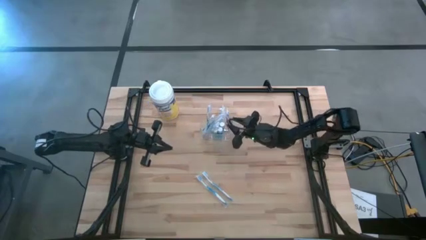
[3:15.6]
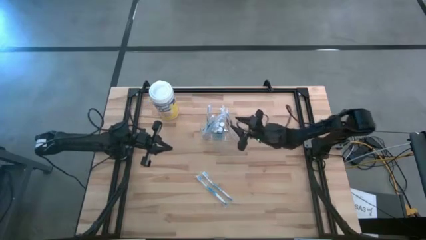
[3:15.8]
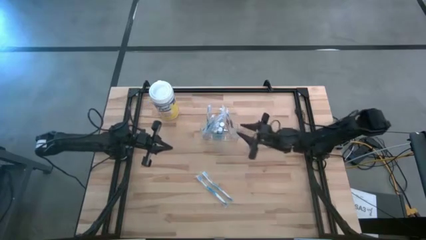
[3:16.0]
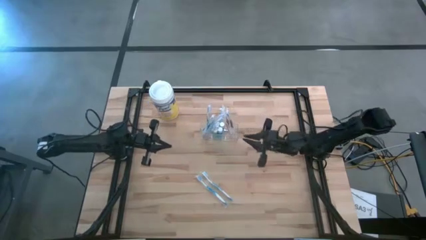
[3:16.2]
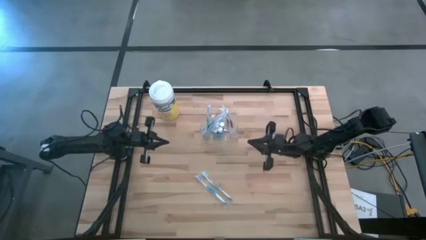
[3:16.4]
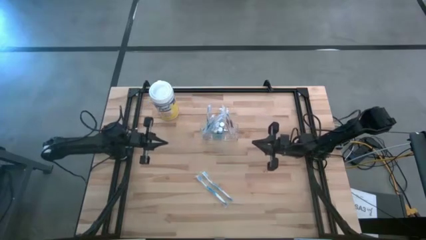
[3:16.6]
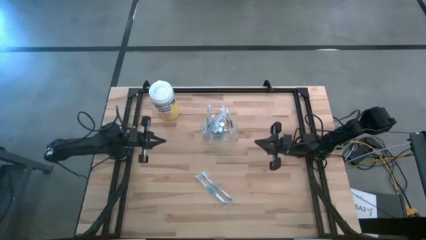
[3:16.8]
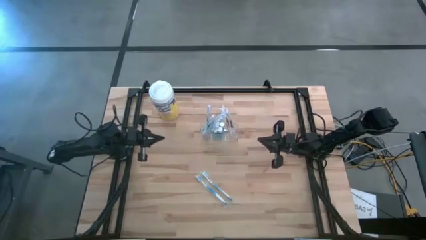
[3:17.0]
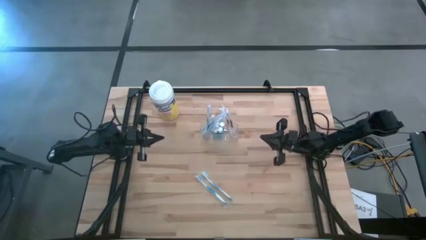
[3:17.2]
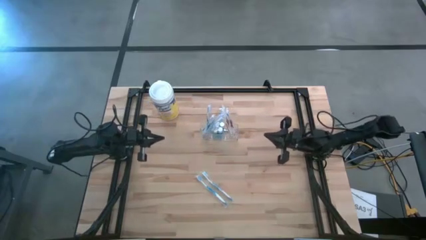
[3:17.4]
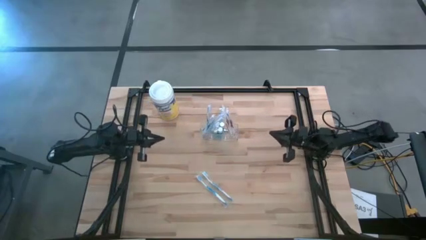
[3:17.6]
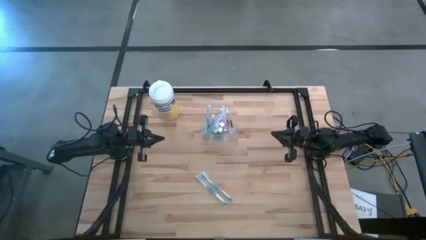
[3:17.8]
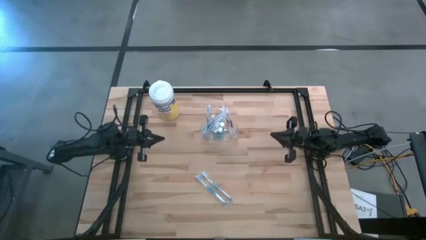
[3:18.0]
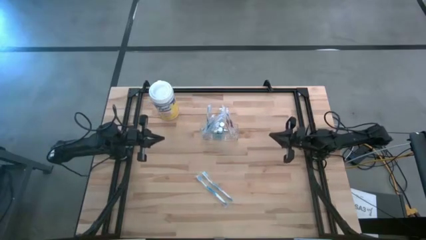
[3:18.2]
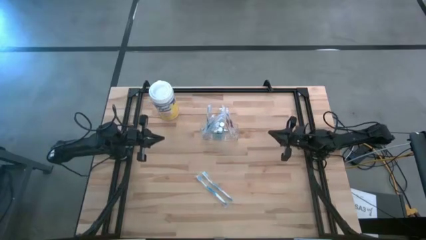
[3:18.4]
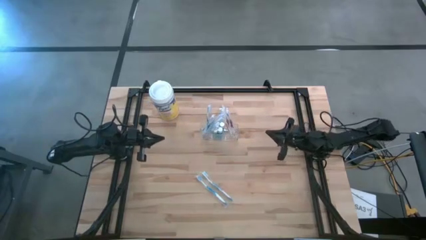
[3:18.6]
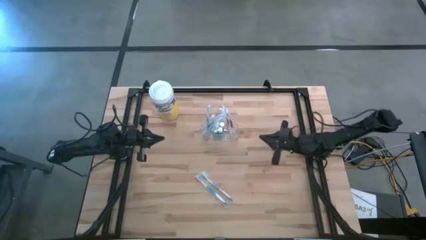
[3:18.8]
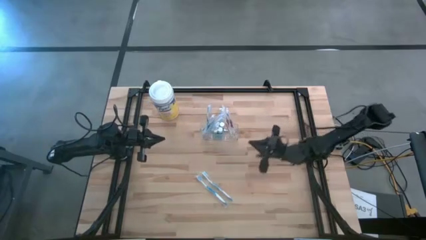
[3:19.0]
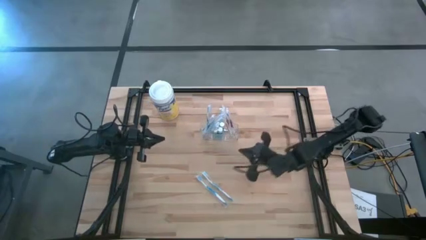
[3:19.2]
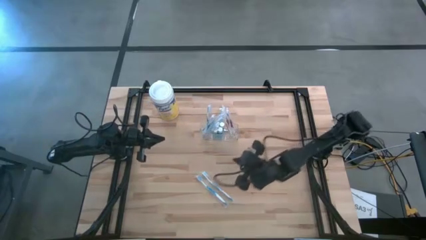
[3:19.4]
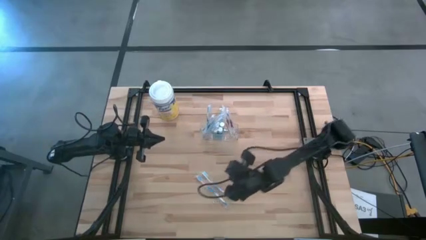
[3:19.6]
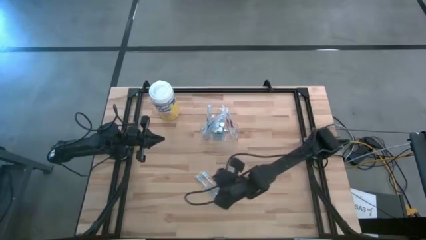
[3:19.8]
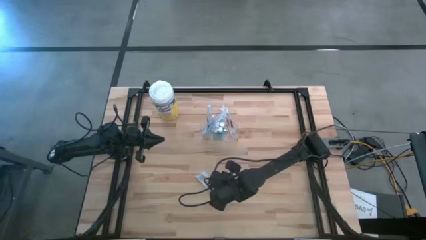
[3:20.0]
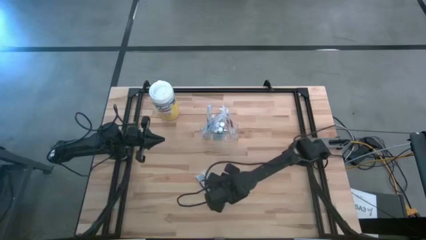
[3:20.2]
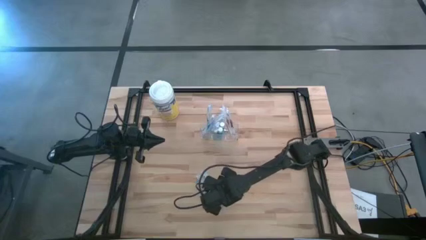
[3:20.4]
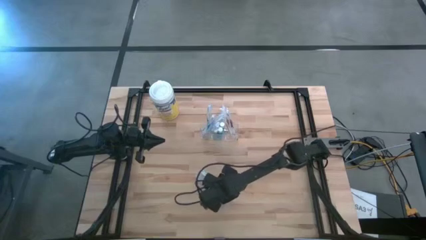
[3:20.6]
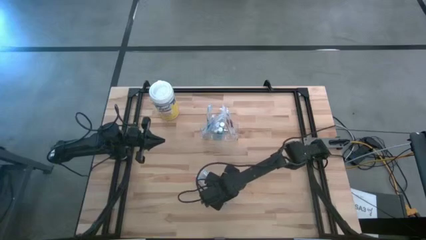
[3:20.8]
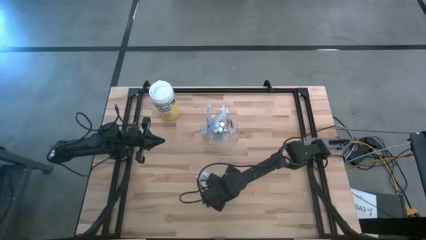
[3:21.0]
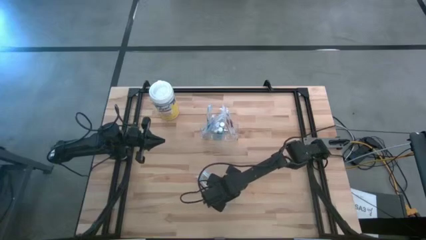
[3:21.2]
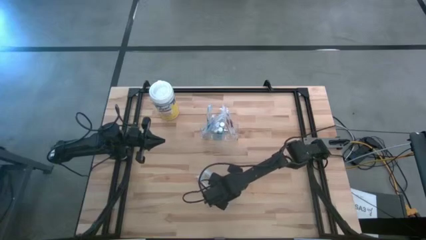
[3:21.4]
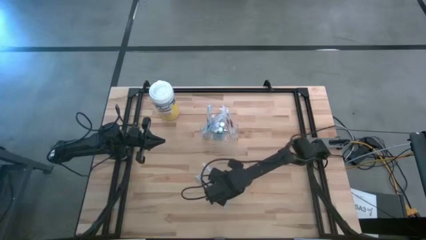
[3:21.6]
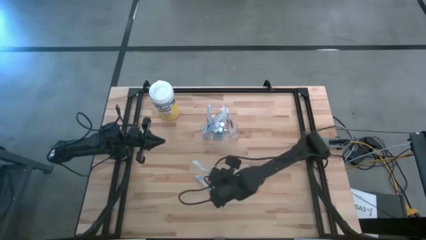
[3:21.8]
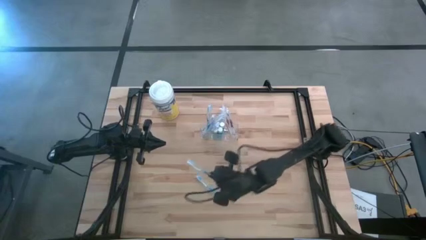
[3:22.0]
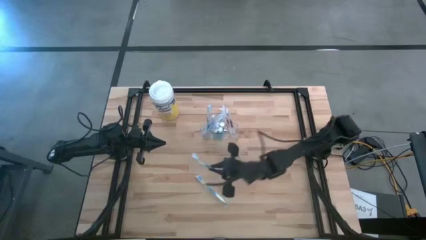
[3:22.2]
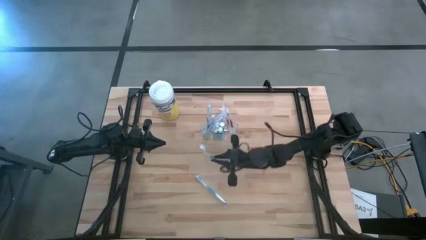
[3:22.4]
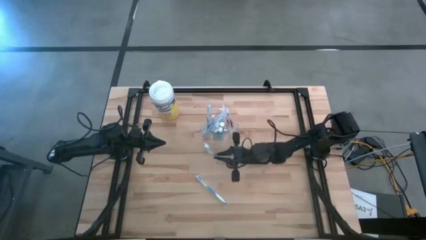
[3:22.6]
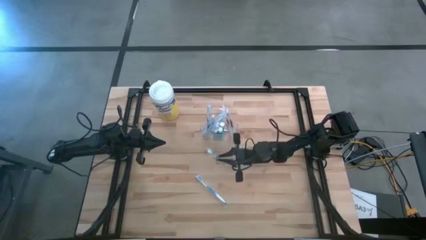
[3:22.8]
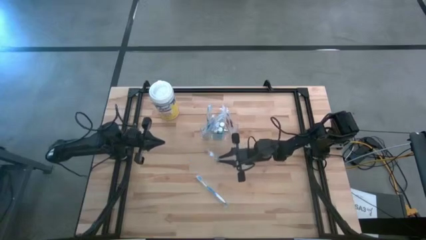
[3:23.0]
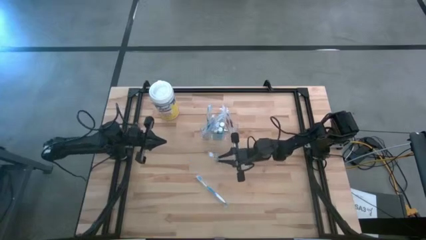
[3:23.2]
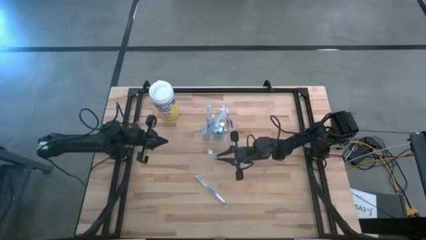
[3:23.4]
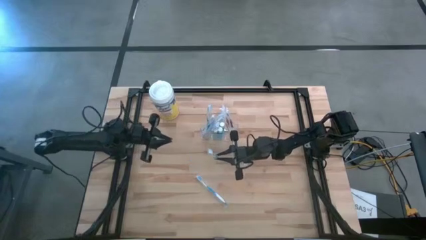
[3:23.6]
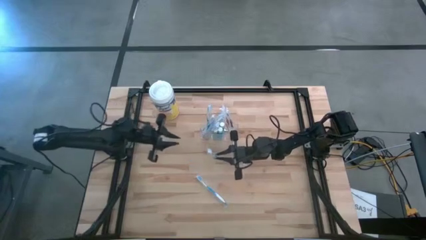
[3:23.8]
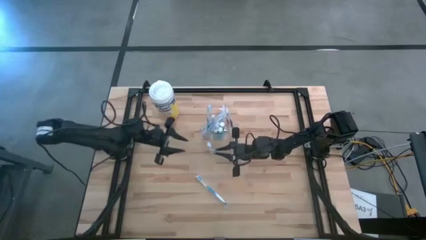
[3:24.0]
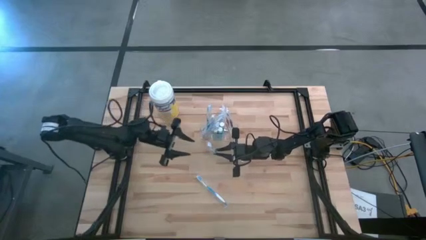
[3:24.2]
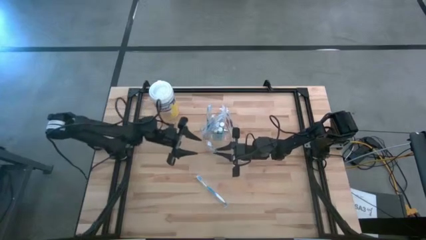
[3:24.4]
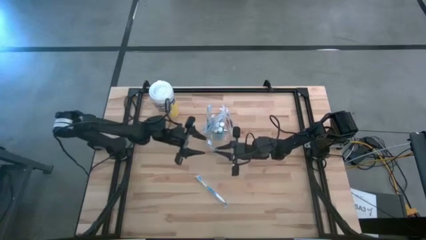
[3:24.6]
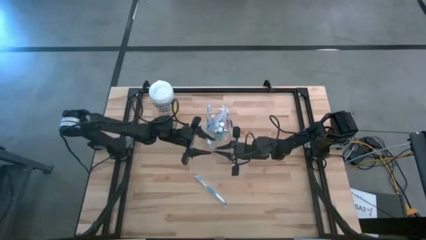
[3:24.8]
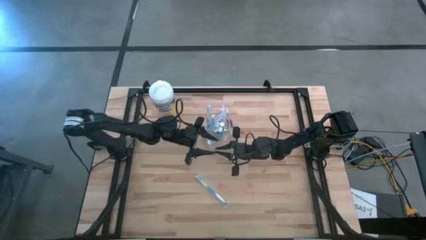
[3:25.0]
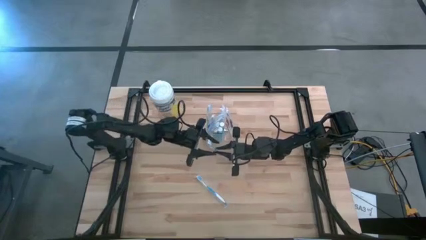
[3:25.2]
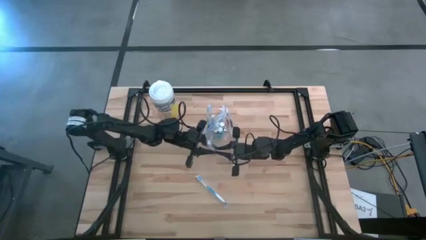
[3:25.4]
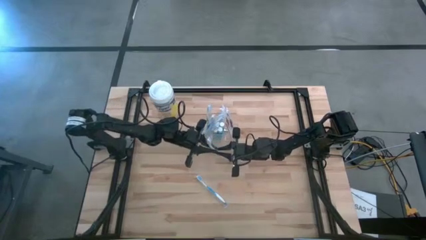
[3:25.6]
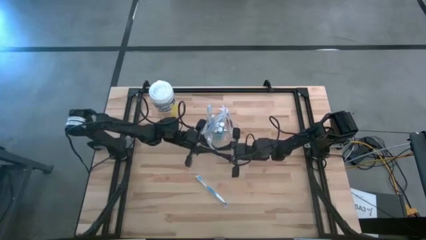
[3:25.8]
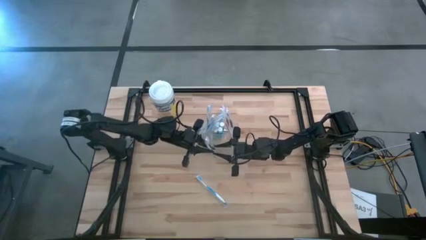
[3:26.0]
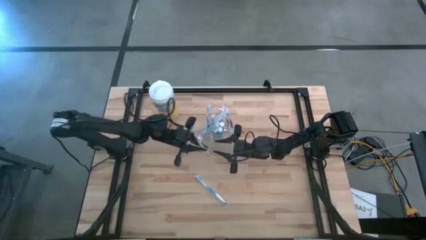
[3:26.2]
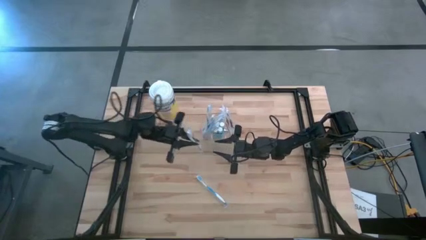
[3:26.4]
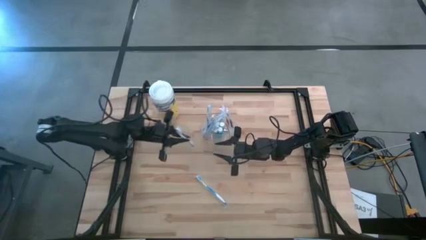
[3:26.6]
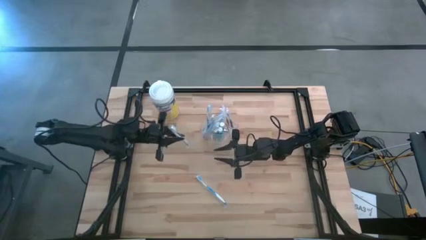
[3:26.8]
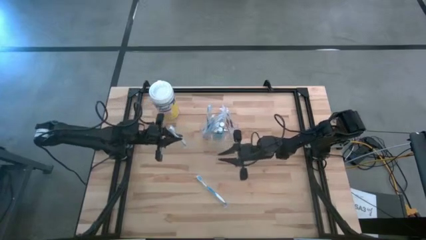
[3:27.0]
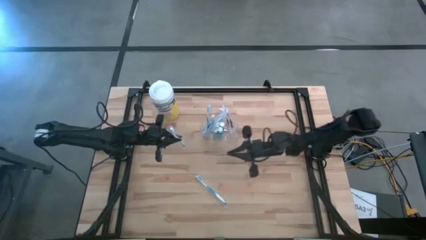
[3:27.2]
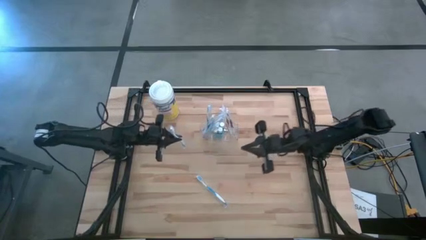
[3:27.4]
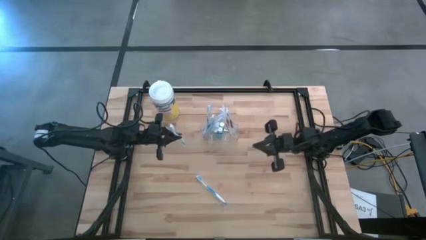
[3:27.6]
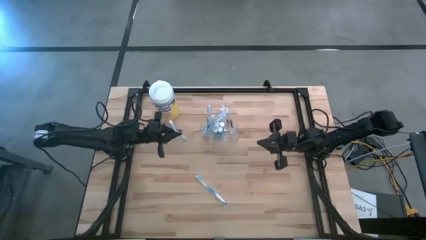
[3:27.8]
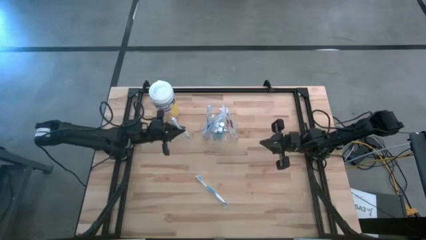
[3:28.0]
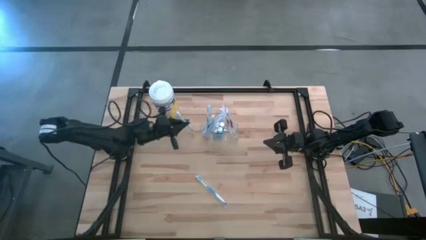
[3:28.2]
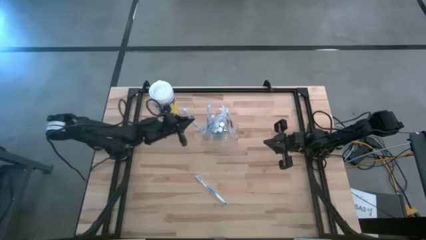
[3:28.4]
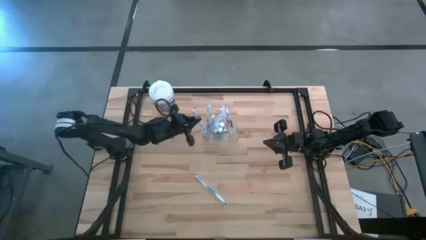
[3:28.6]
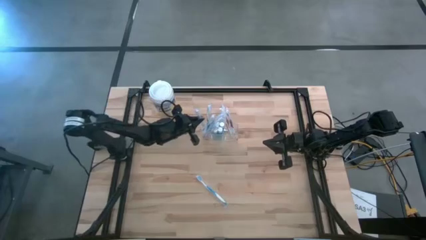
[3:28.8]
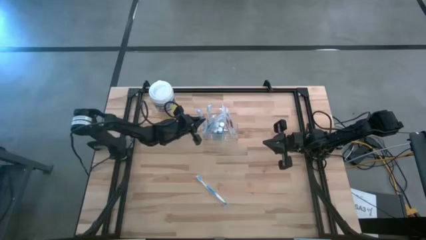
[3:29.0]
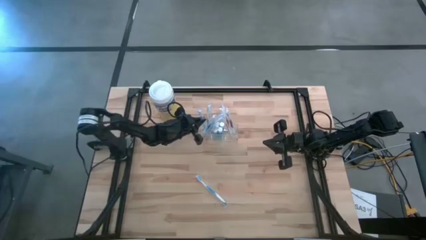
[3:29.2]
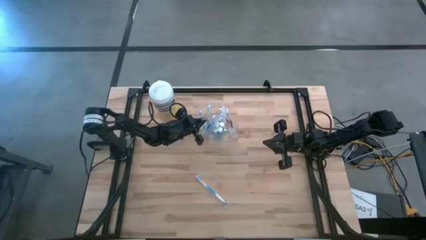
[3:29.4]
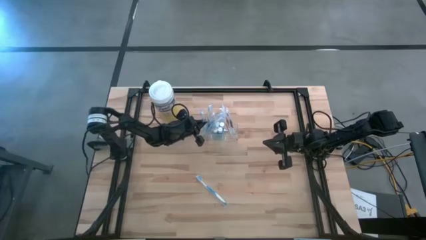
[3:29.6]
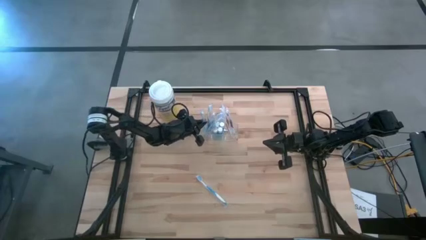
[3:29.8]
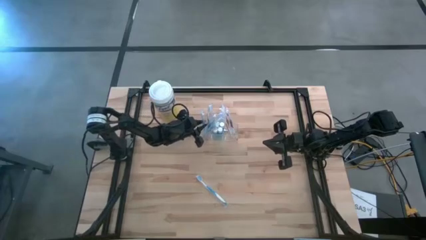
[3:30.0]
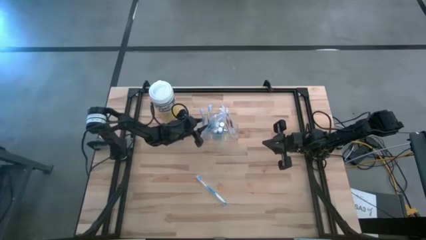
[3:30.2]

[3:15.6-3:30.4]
Task: Pick & Place toothbrushing station
Put the blue toothbrush into the left section of the transparent organizer
